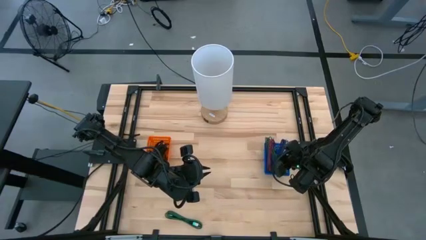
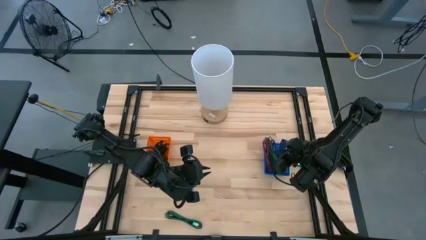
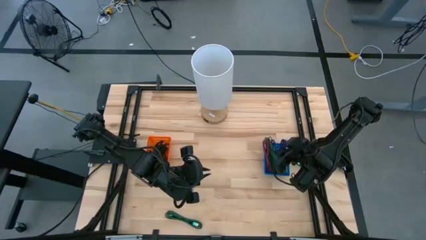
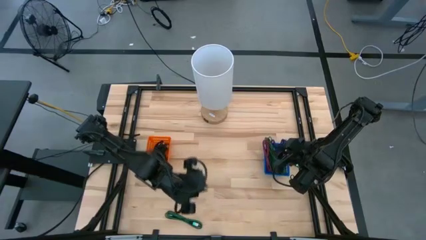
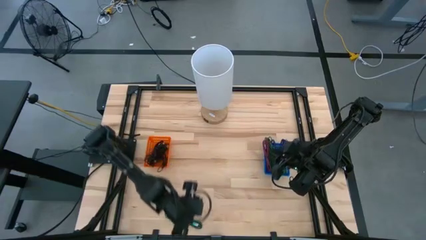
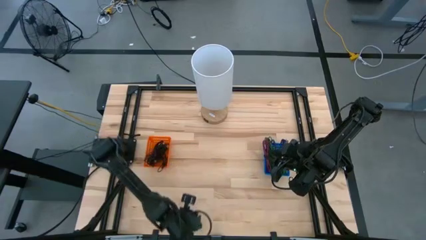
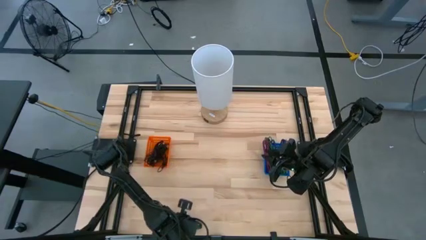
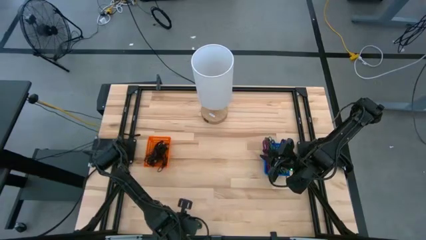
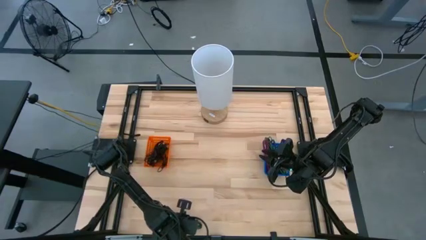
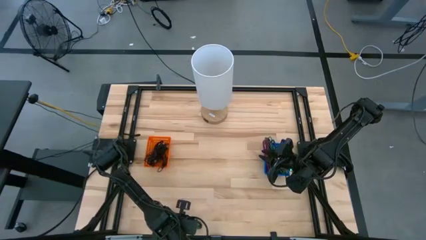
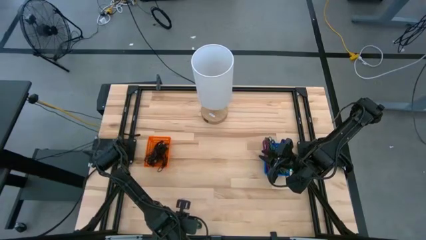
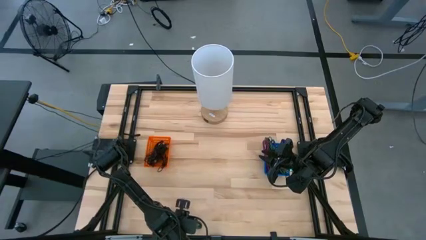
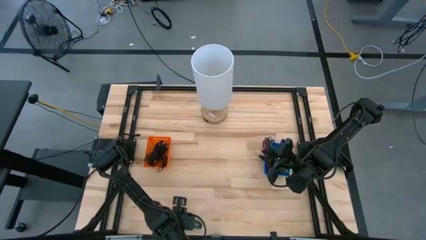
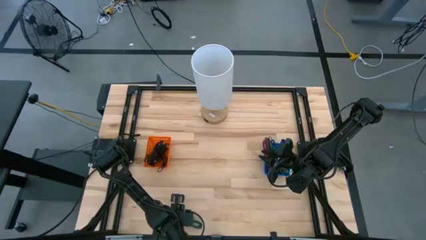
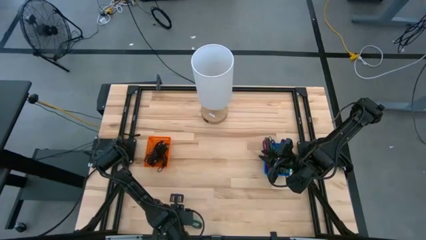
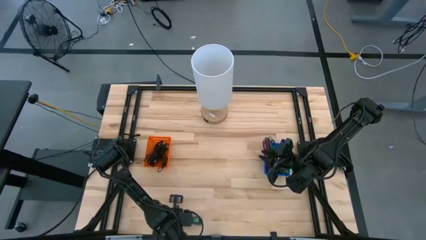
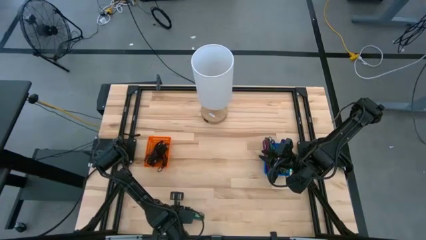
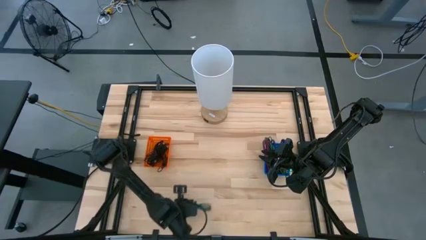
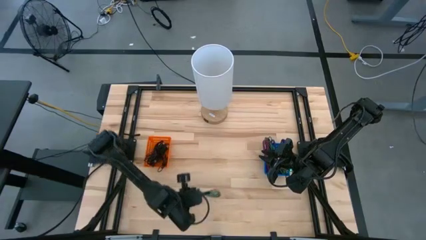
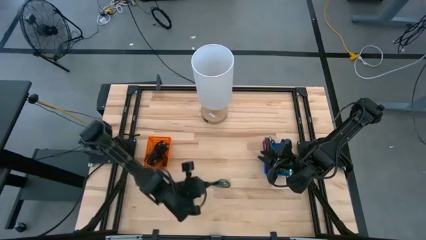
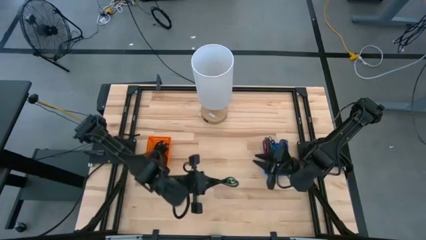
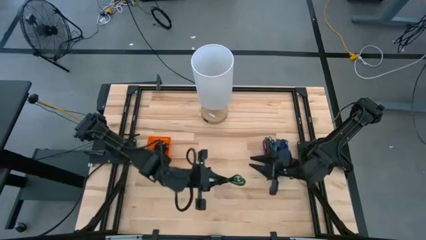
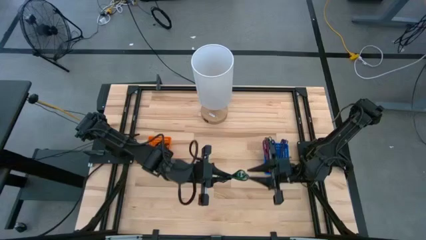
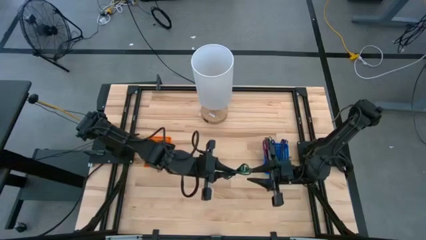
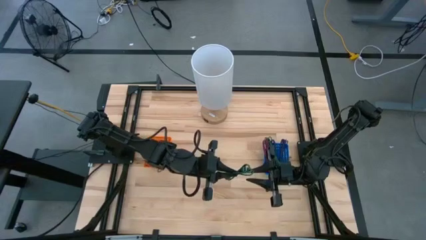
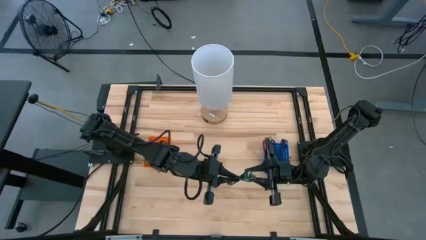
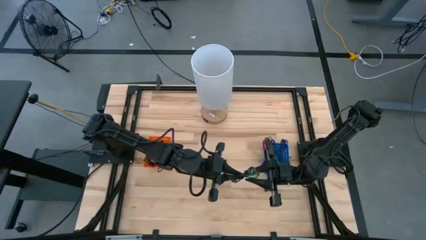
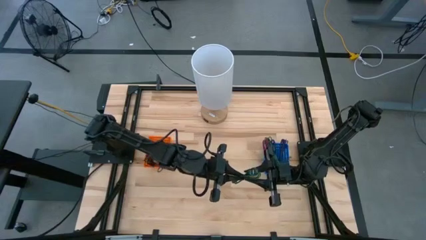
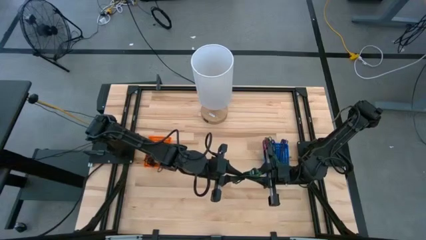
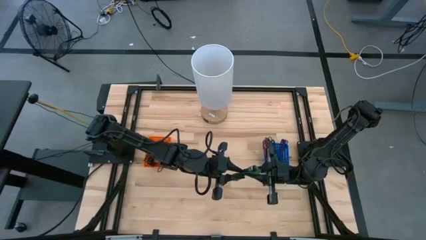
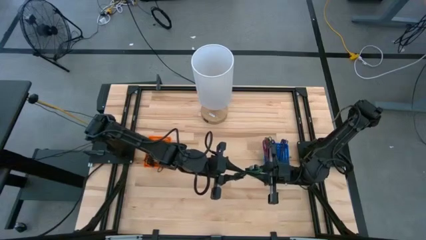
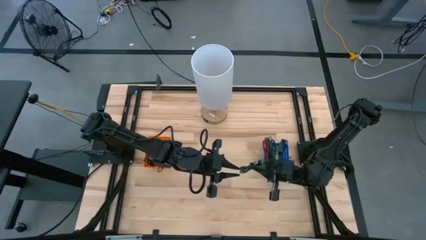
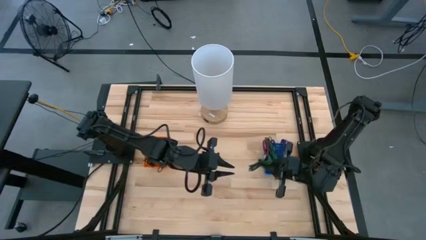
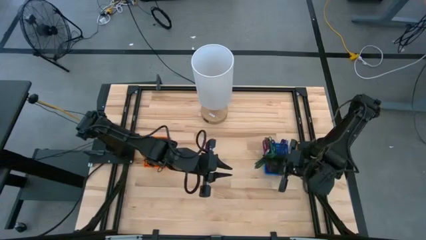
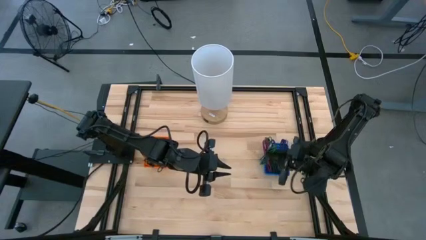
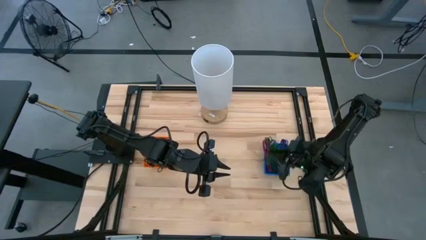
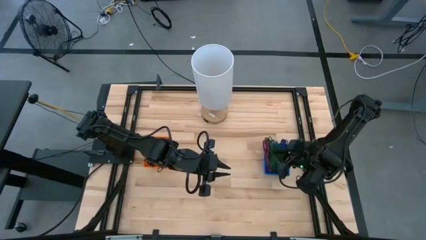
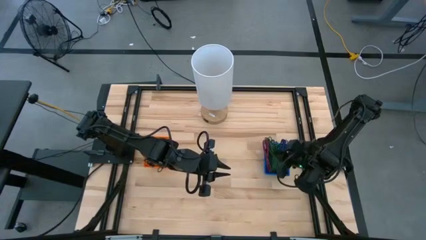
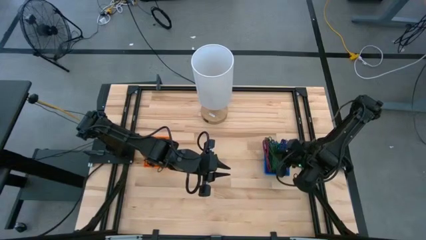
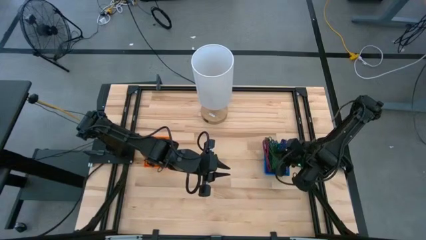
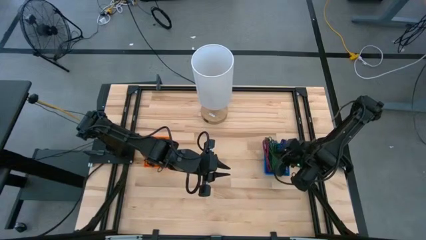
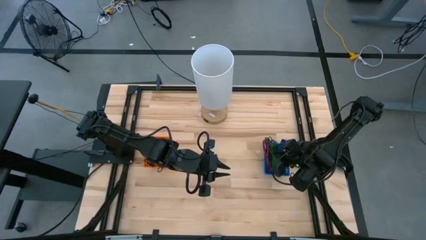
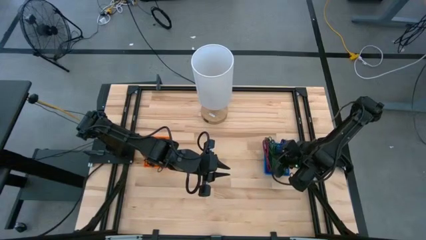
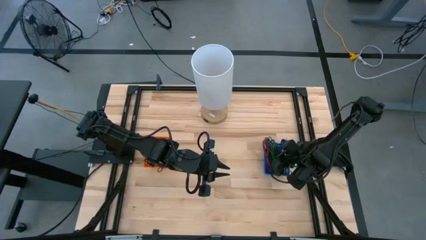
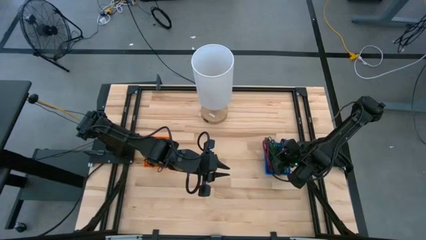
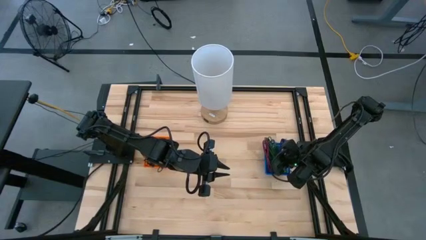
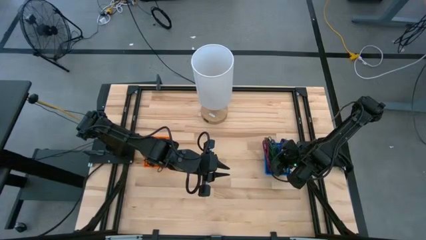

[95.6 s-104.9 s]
Task: Pick & Place USB Port
Put the green charger cable into the blue bin

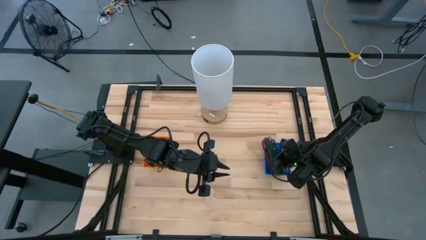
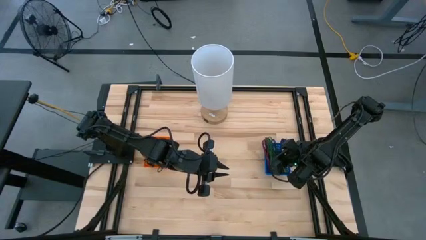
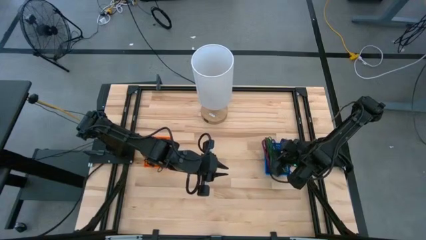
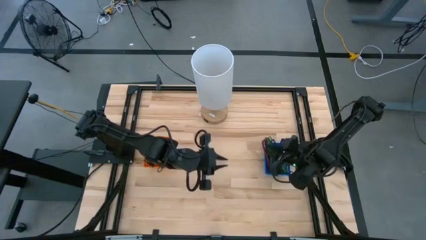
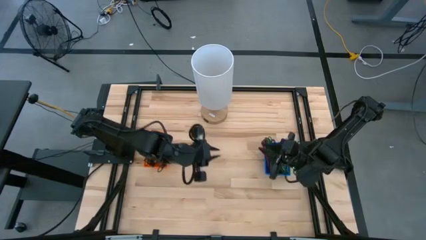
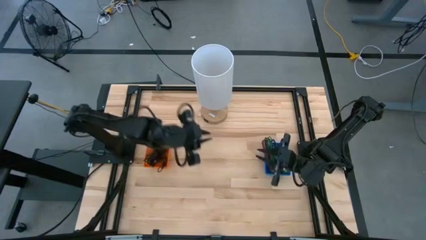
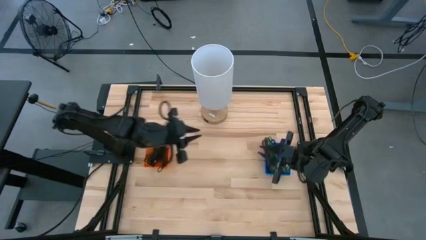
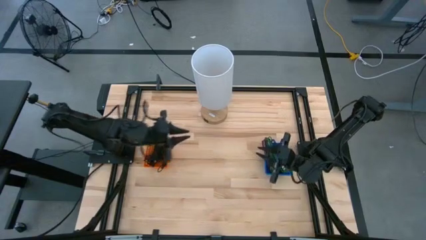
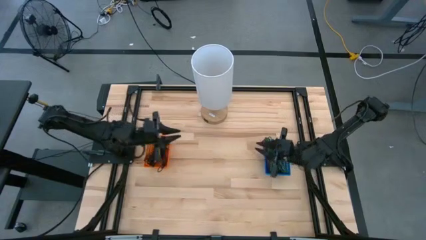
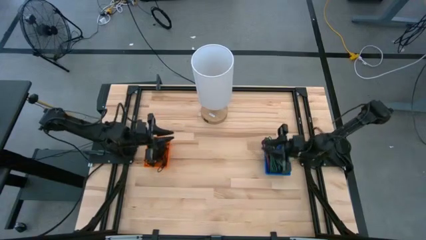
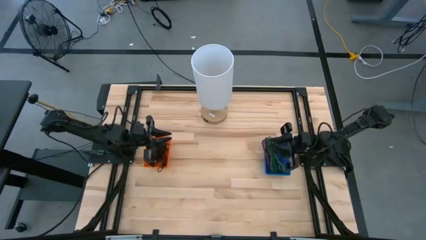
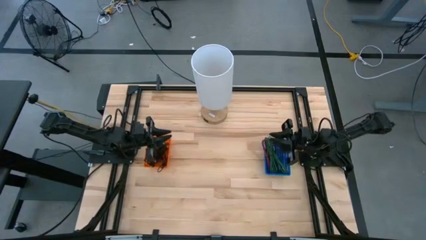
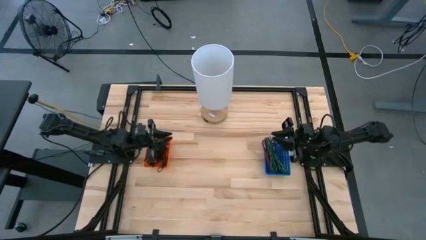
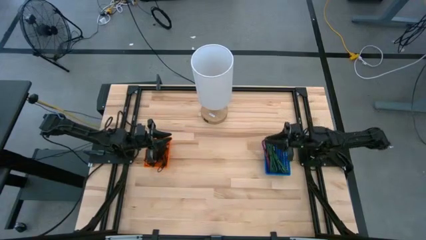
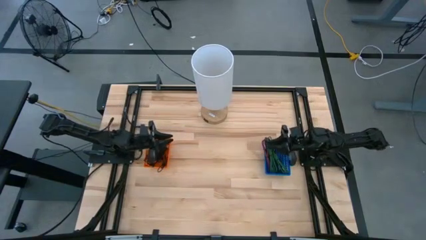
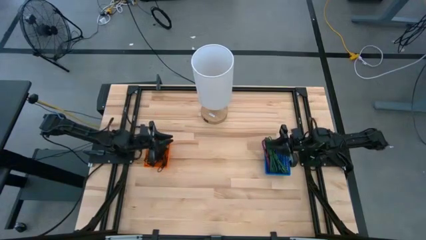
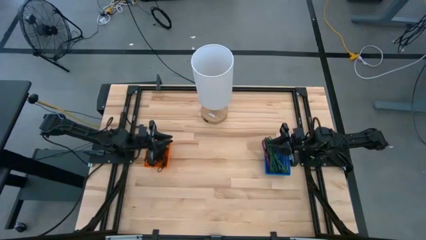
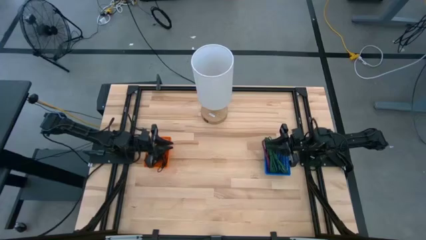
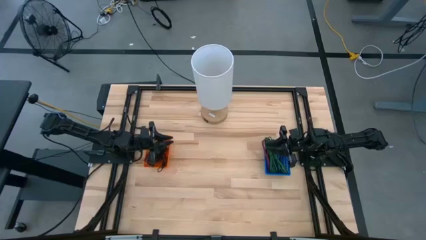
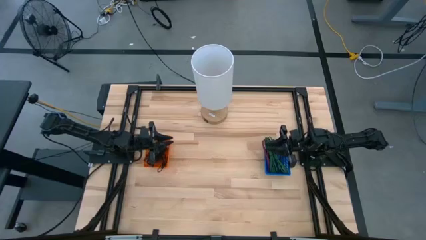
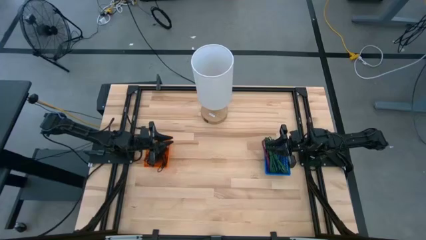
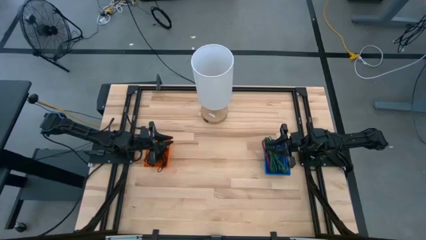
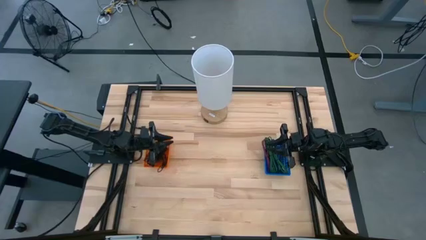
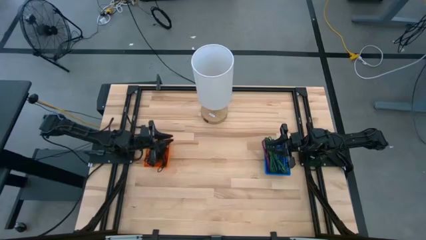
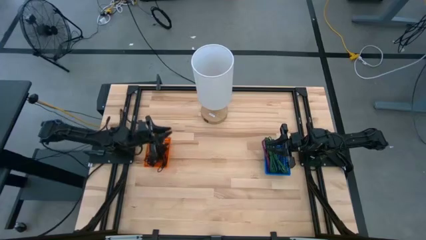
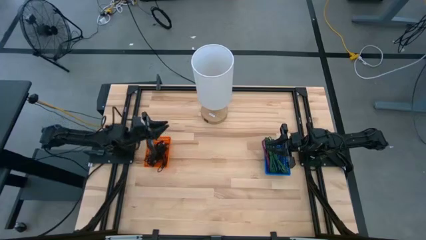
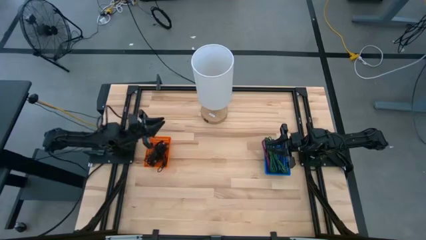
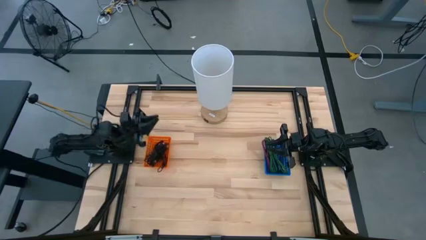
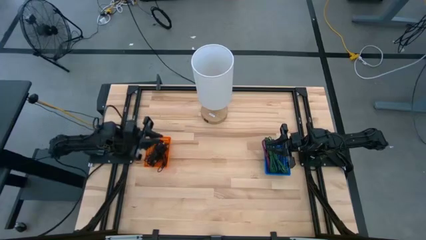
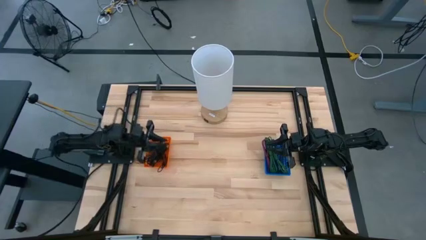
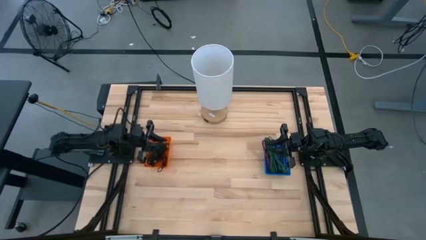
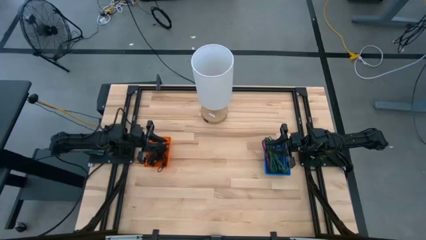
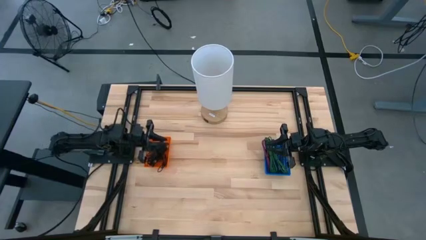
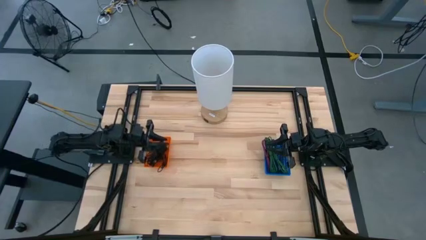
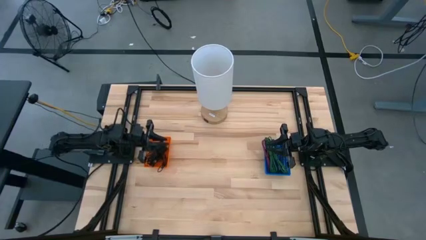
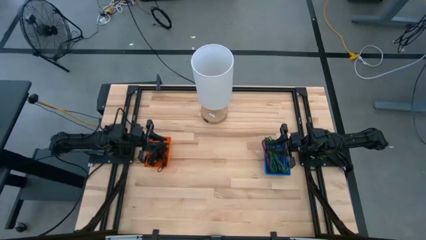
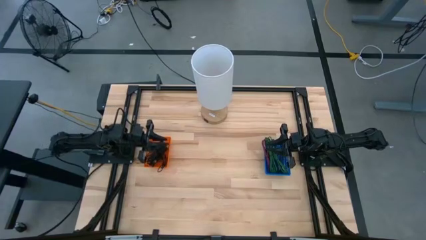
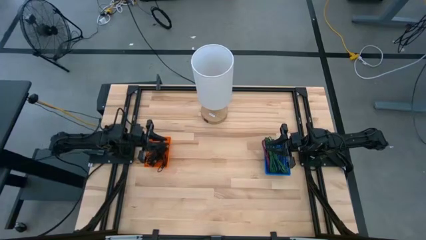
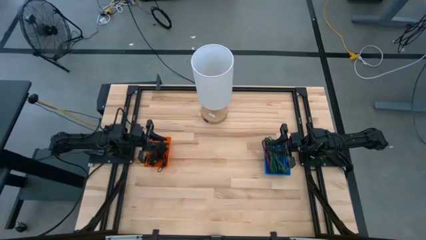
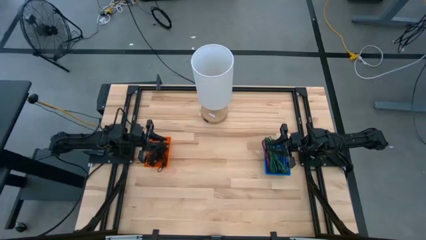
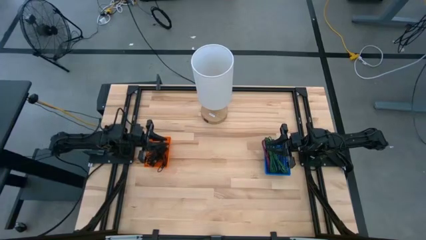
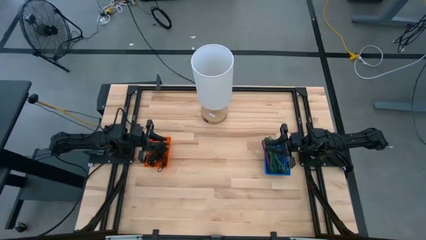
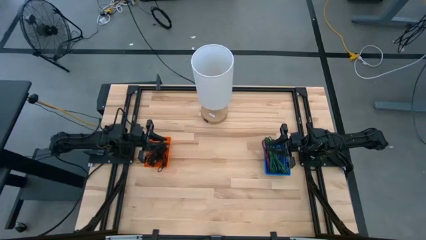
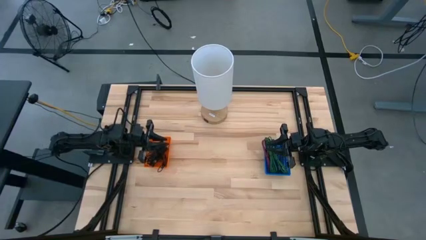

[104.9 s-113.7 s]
Return to Home Position
